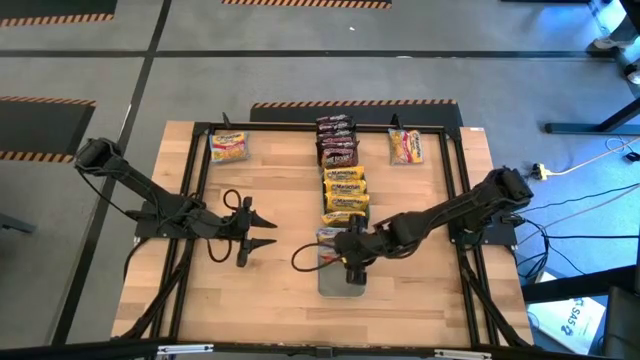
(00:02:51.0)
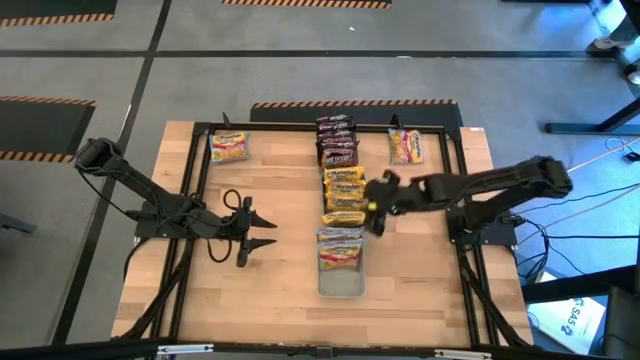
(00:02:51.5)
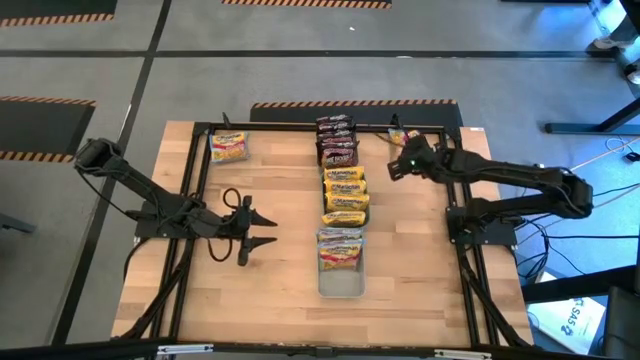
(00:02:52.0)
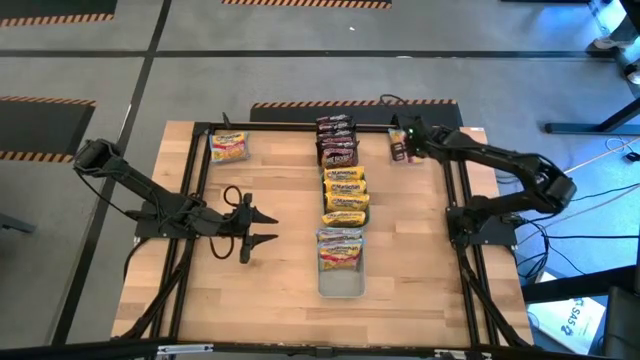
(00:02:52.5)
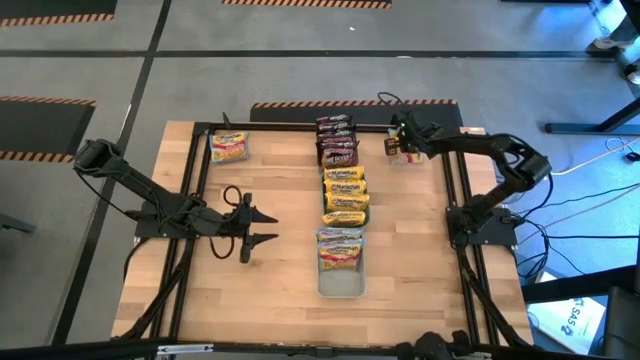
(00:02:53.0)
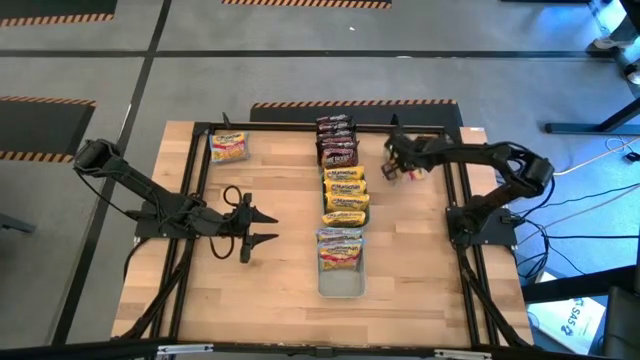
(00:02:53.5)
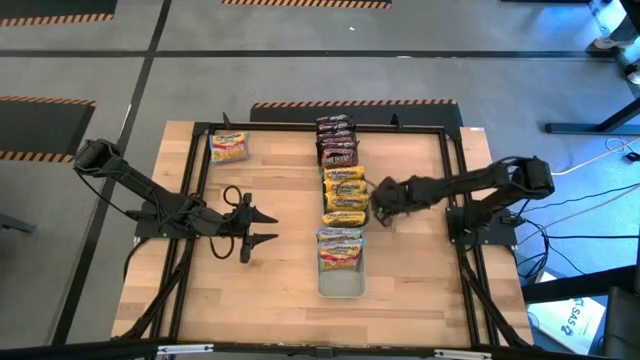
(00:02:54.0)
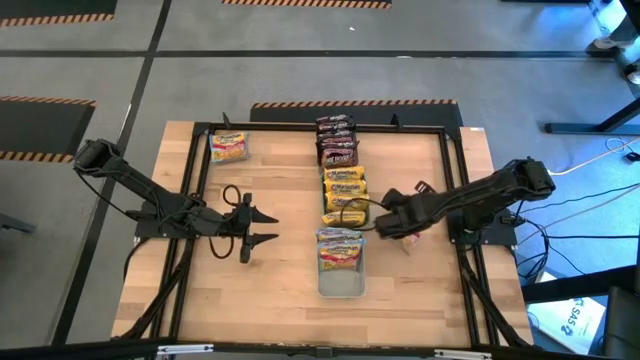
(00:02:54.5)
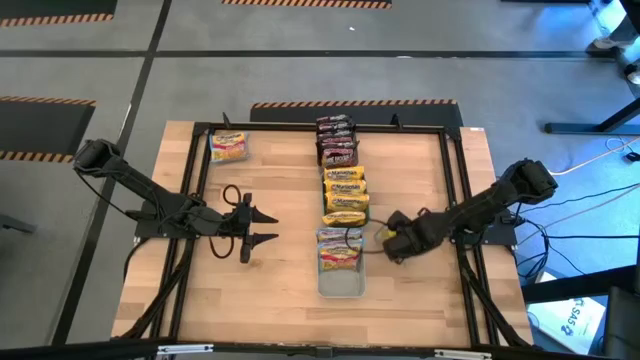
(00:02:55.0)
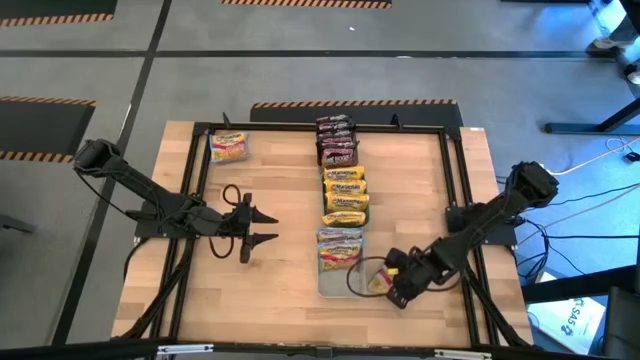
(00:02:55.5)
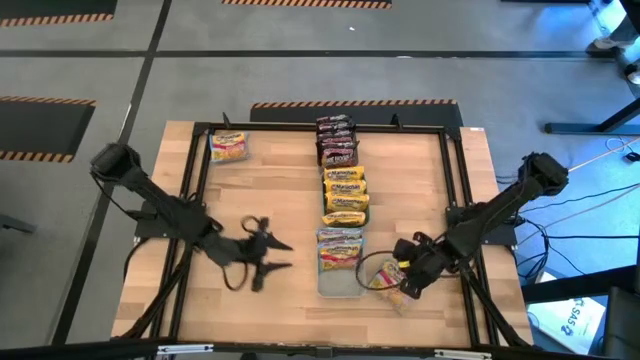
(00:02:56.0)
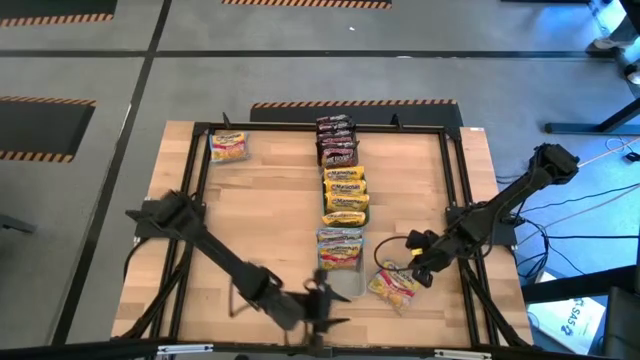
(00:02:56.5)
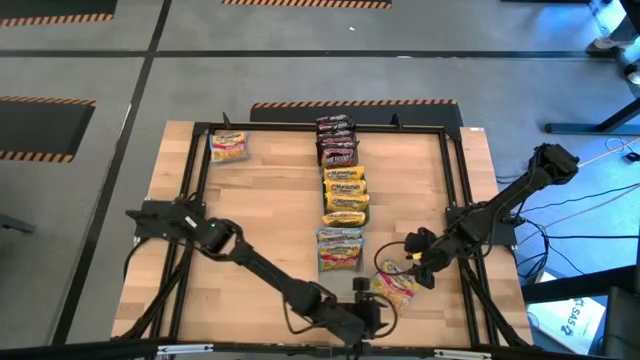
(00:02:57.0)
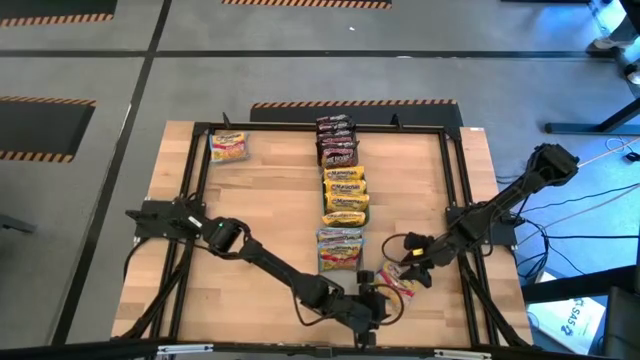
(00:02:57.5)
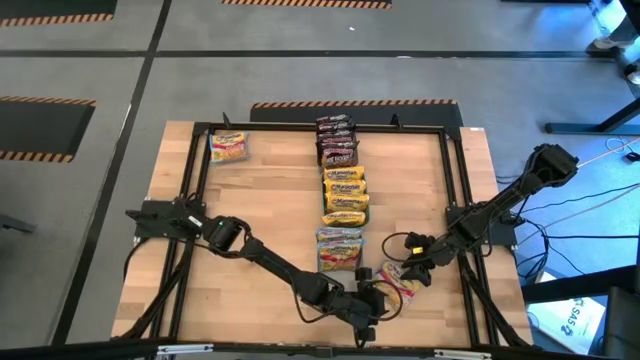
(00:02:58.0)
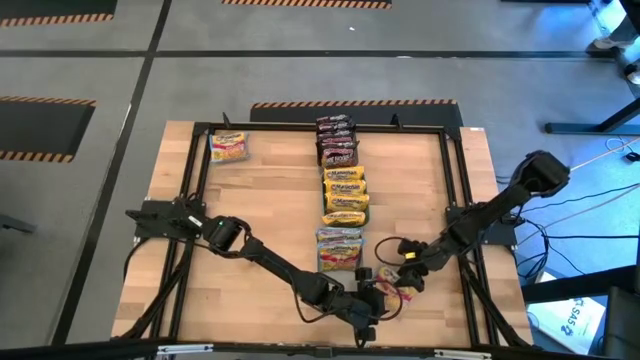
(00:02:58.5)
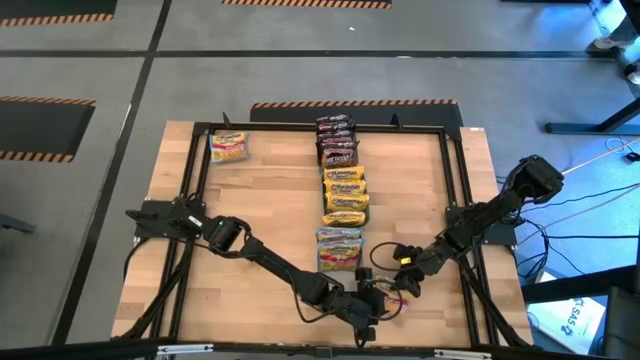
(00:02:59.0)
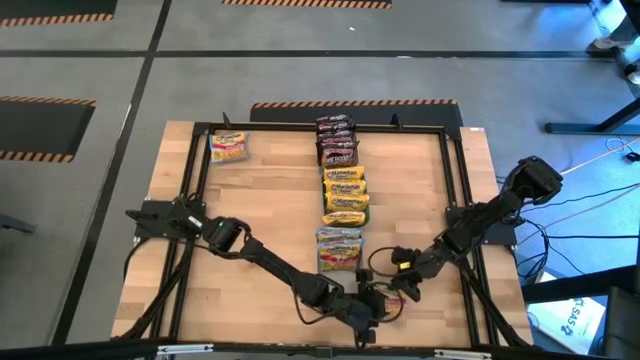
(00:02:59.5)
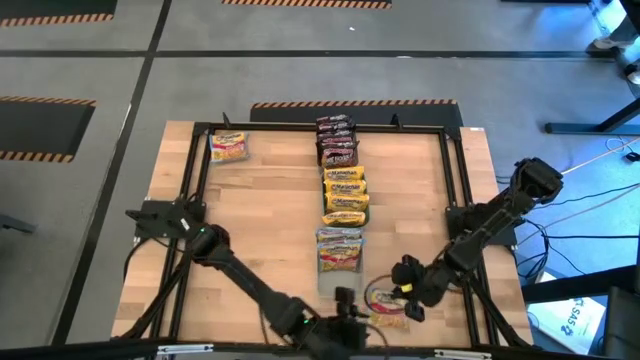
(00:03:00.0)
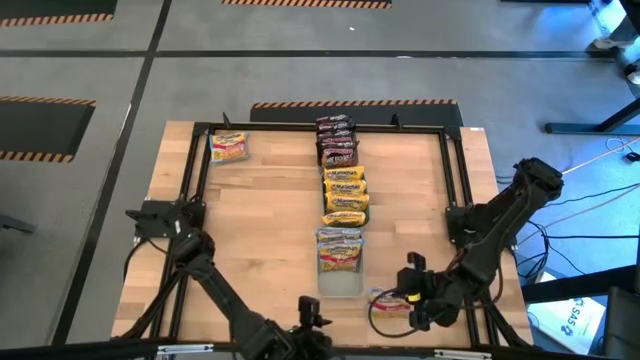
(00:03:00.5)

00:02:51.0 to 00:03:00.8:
Task: Sort Maruchan noodles
Put the blue noodle pack into the gray bin

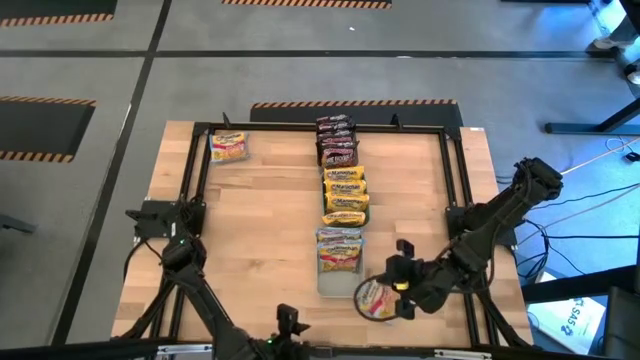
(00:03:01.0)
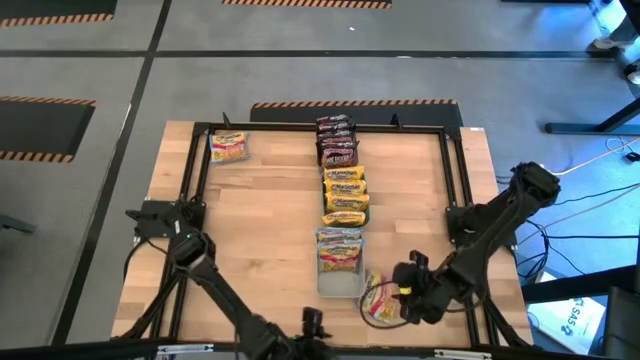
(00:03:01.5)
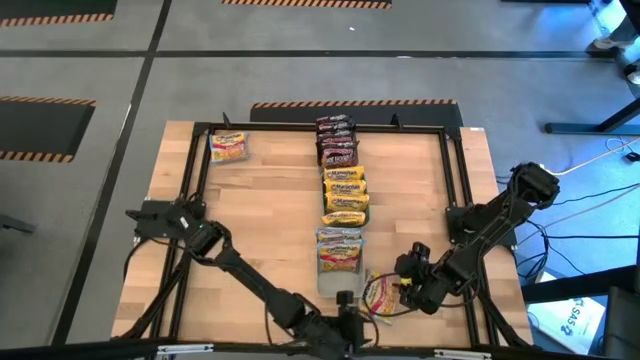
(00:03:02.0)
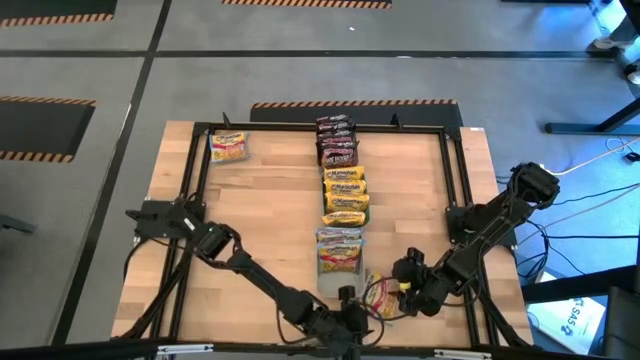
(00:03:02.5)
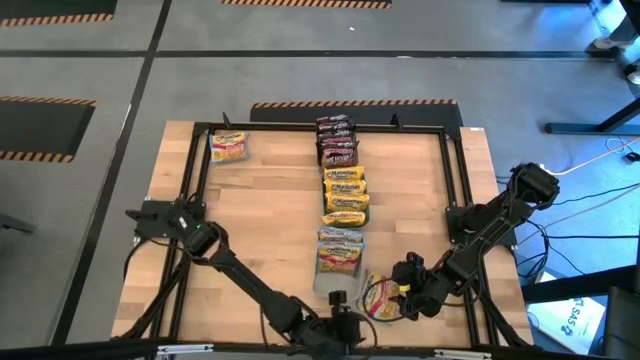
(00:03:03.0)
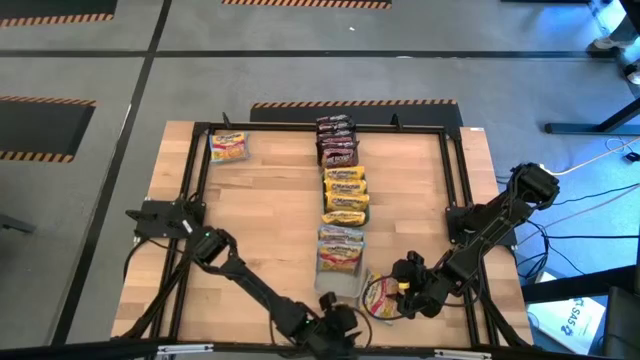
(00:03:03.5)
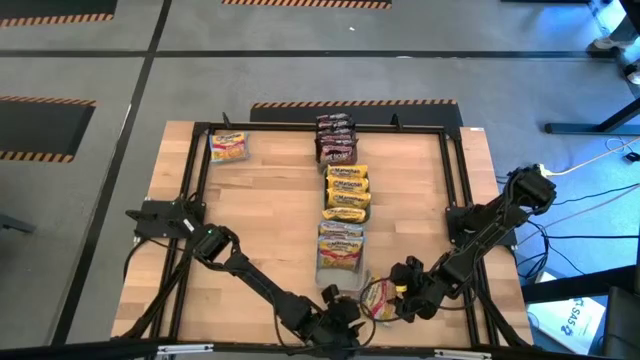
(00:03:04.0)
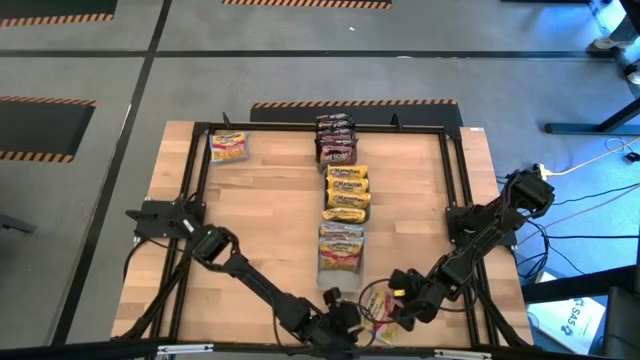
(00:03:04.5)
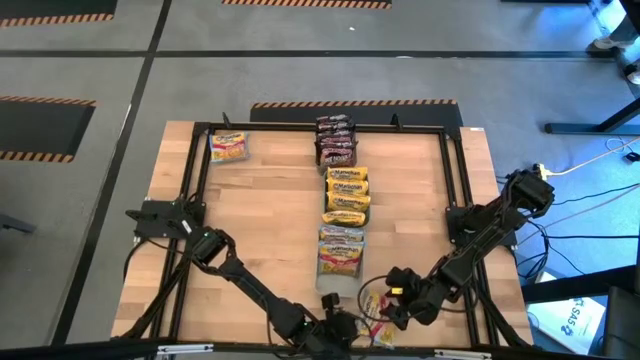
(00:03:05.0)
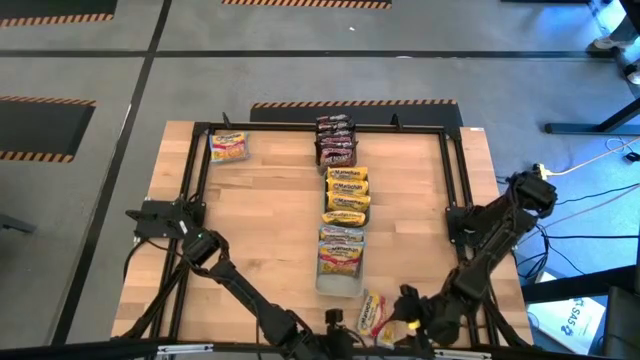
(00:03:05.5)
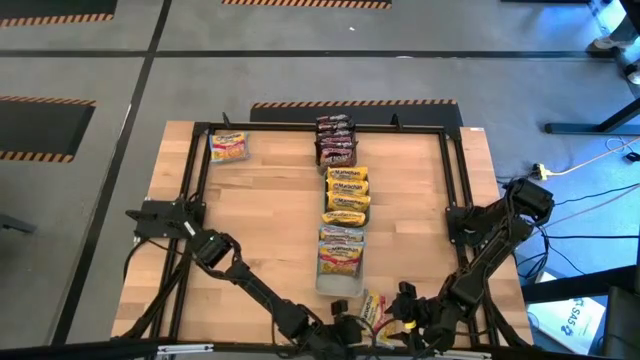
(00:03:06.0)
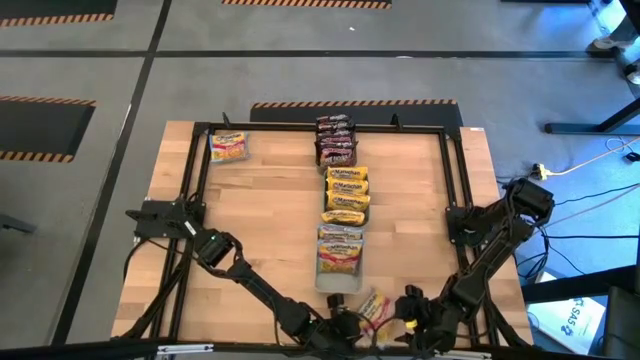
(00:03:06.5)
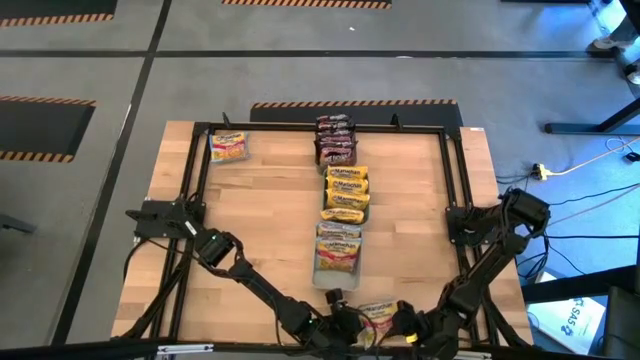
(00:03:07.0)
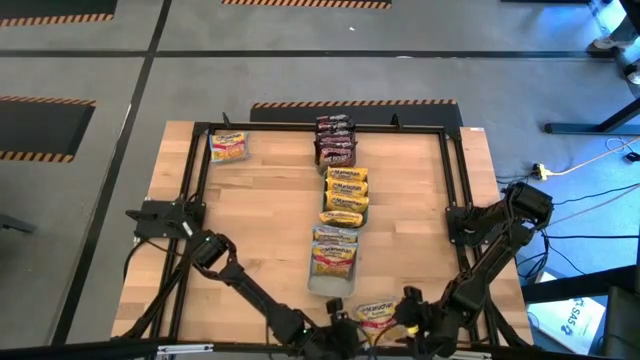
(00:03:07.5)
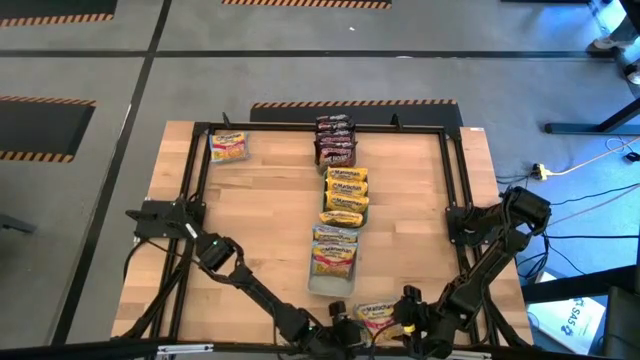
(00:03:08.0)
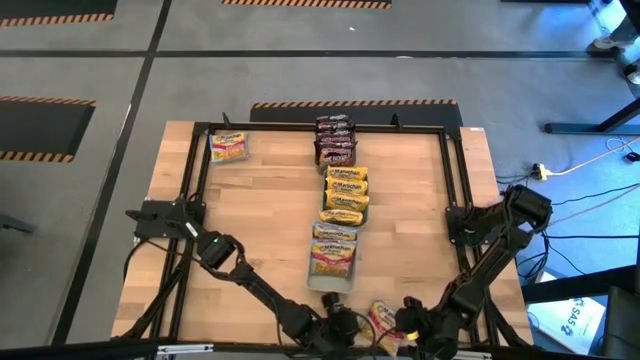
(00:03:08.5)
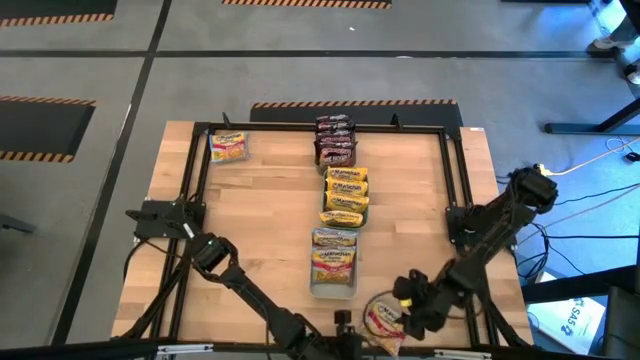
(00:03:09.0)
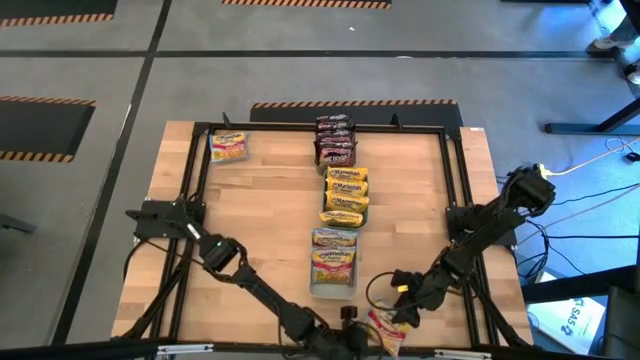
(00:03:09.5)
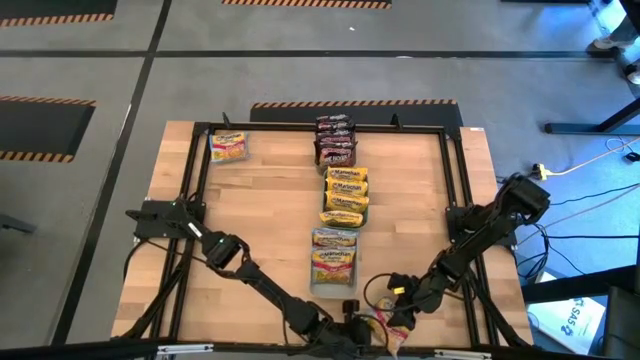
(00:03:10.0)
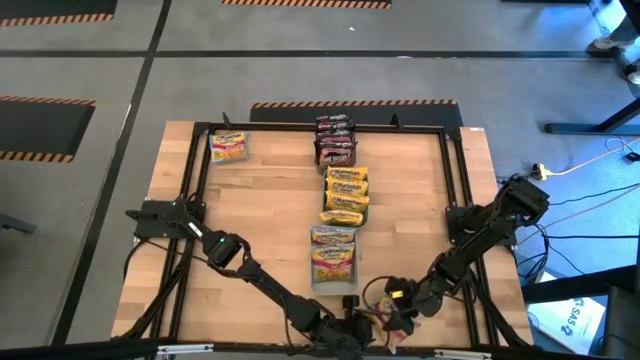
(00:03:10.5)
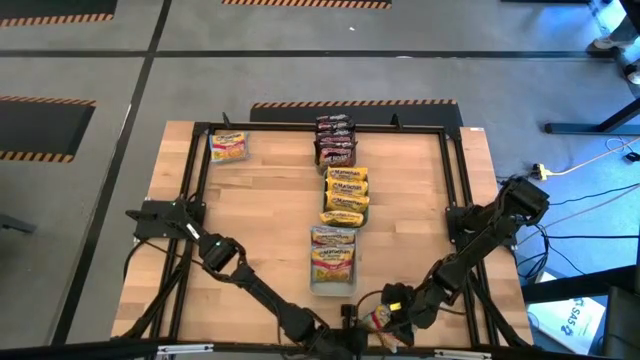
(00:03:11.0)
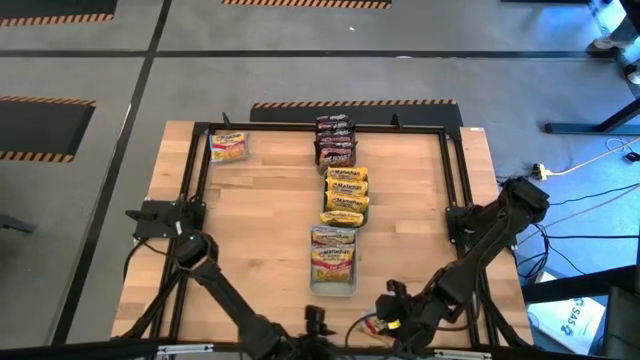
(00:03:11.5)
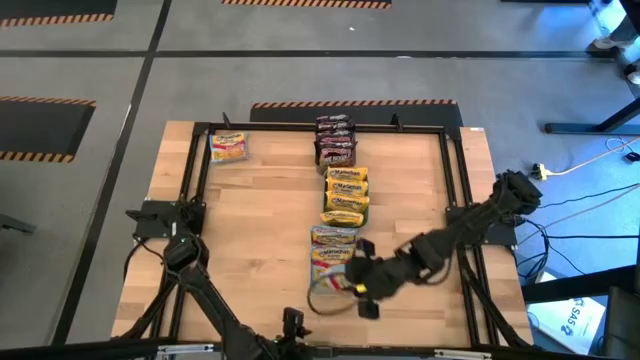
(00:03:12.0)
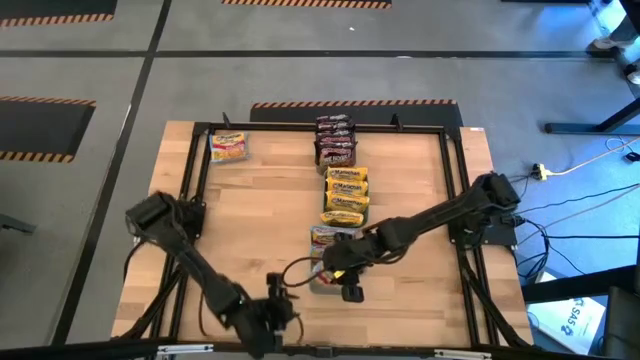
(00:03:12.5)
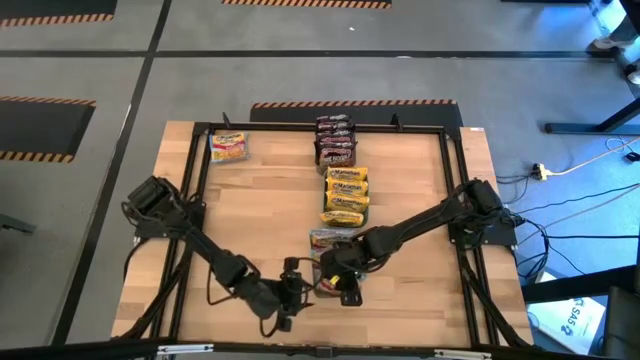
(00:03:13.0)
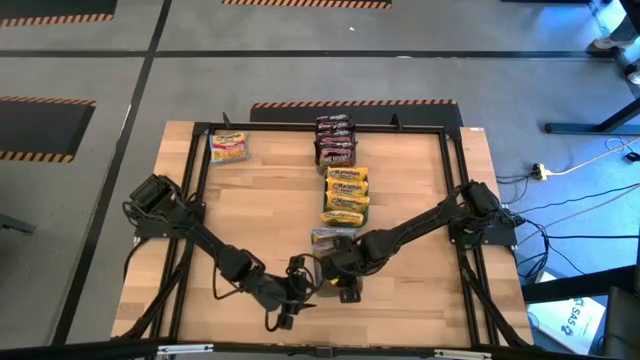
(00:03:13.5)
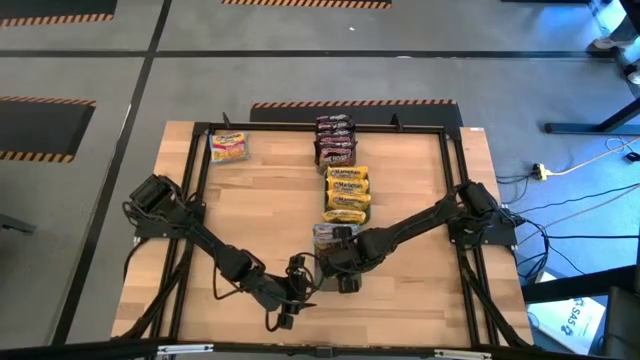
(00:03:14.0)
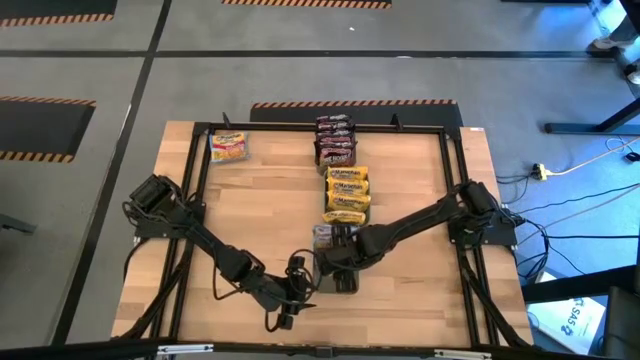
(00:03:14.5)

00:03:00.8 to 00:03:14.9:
Put the blue noodle pack into the gray bin
